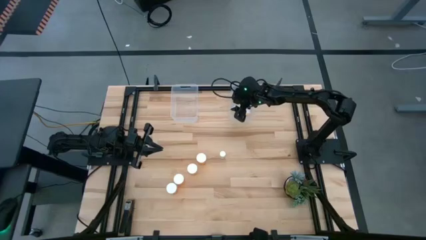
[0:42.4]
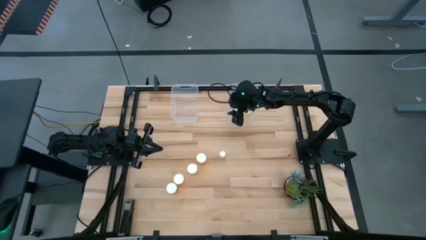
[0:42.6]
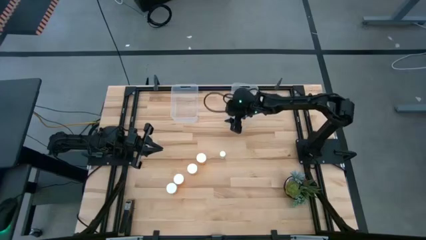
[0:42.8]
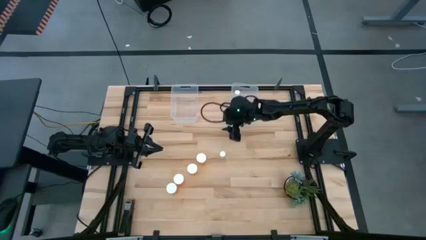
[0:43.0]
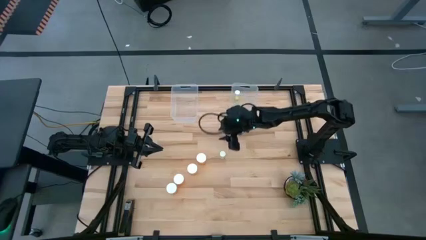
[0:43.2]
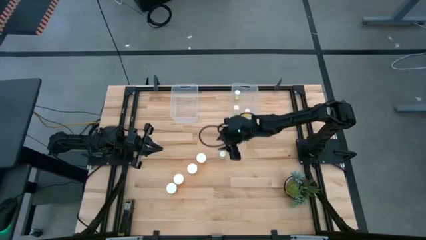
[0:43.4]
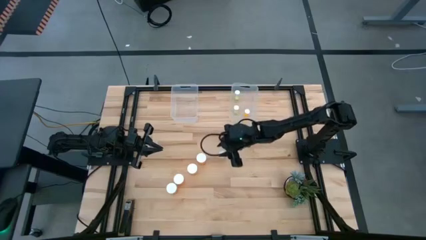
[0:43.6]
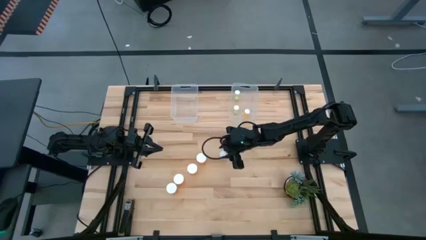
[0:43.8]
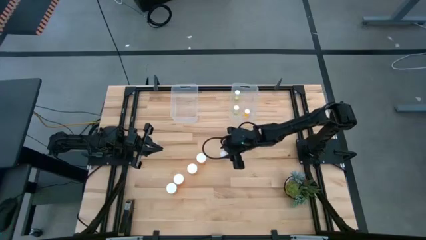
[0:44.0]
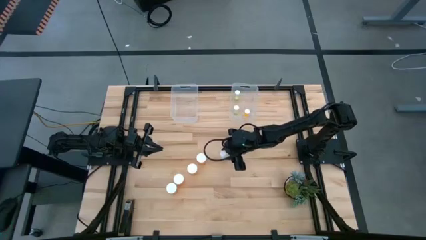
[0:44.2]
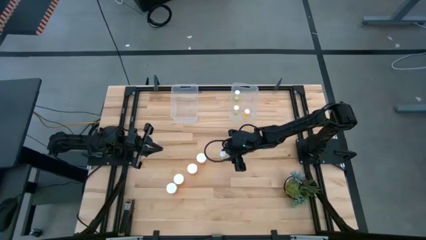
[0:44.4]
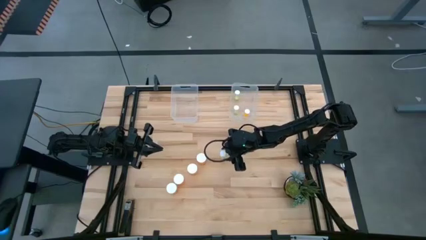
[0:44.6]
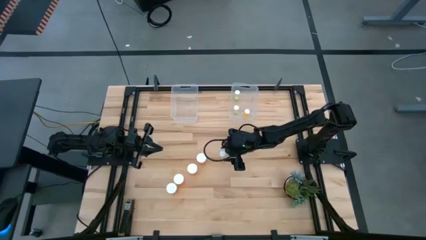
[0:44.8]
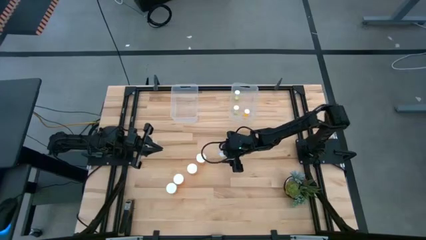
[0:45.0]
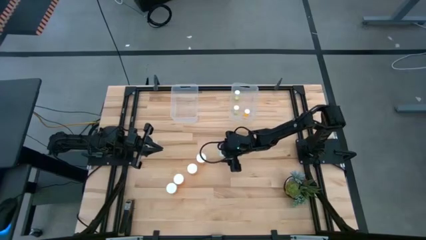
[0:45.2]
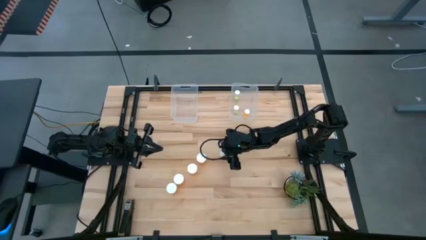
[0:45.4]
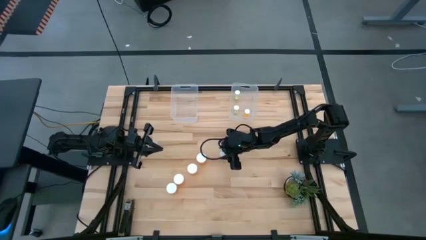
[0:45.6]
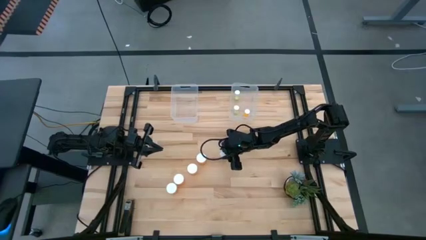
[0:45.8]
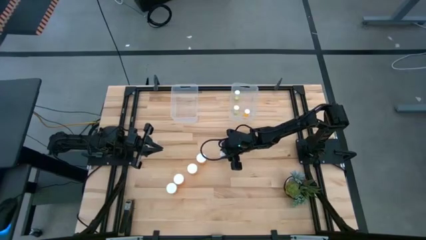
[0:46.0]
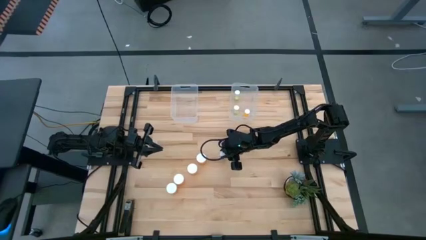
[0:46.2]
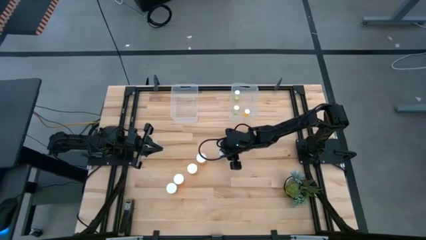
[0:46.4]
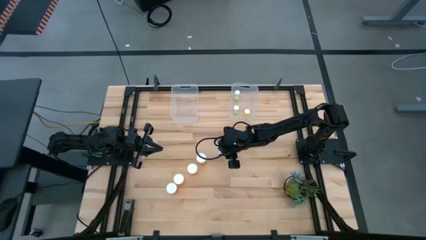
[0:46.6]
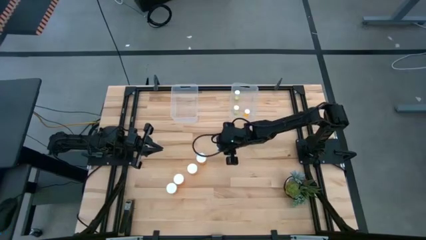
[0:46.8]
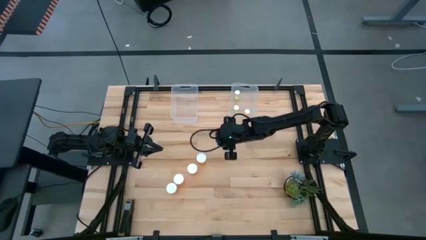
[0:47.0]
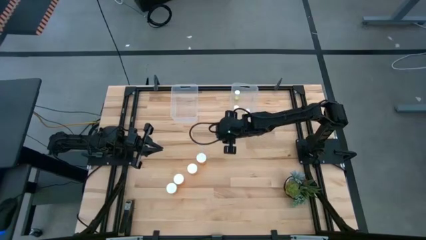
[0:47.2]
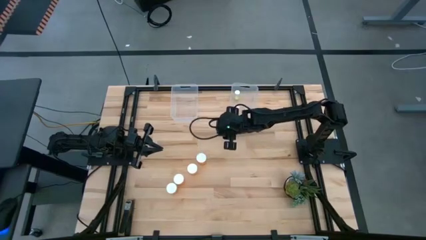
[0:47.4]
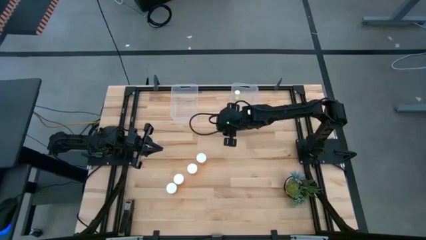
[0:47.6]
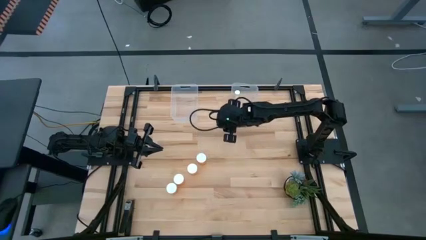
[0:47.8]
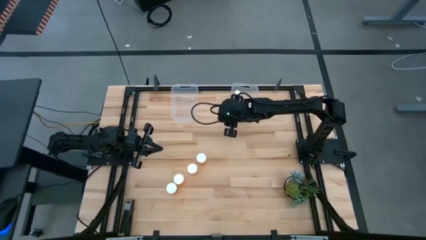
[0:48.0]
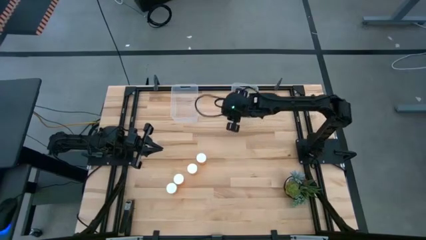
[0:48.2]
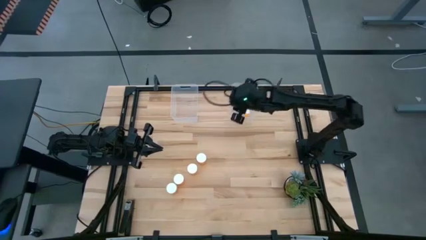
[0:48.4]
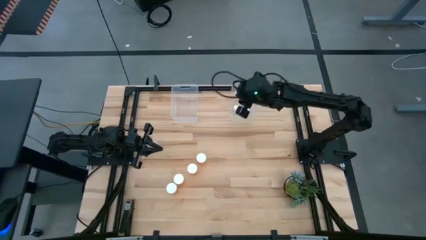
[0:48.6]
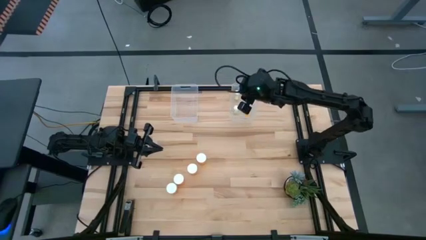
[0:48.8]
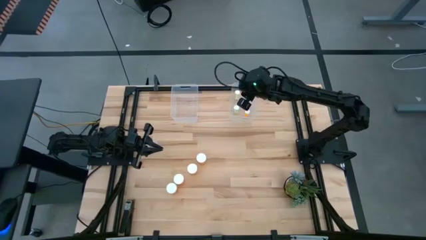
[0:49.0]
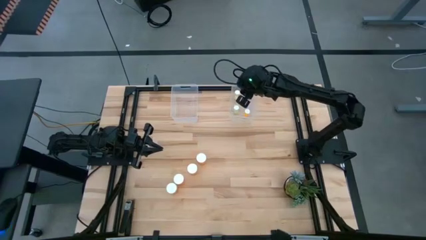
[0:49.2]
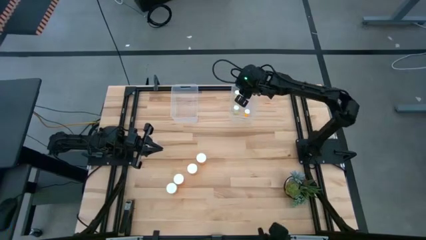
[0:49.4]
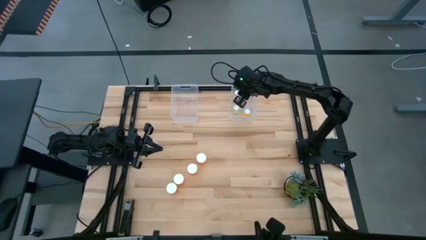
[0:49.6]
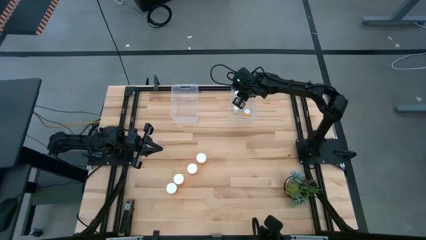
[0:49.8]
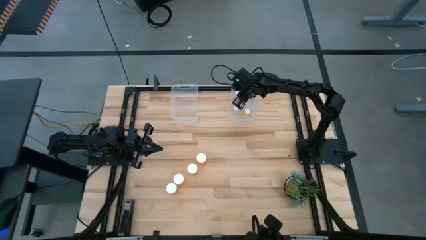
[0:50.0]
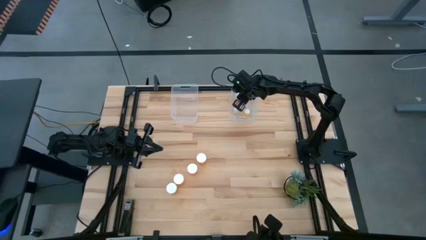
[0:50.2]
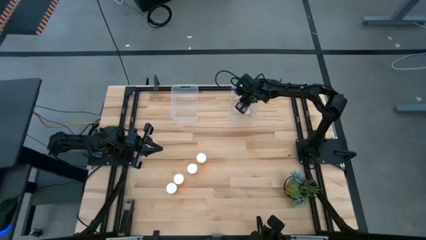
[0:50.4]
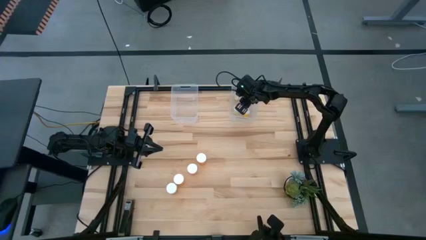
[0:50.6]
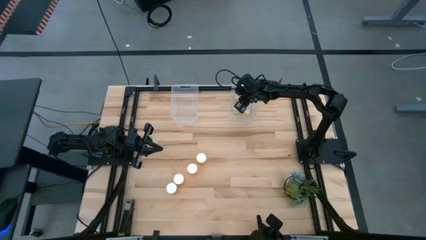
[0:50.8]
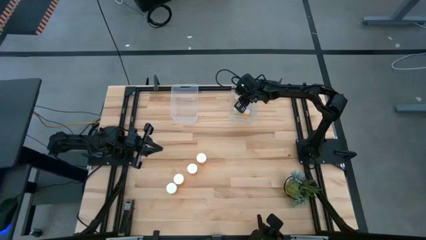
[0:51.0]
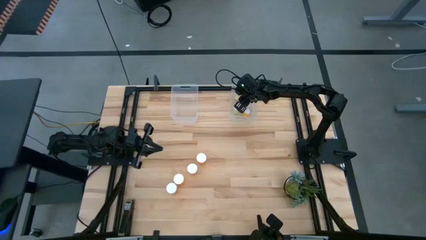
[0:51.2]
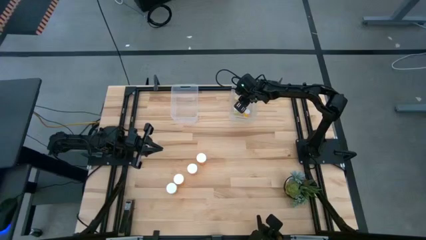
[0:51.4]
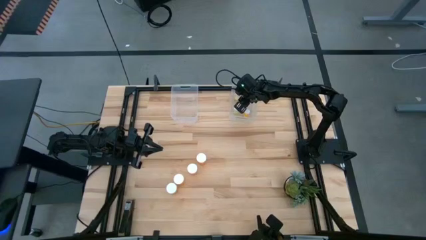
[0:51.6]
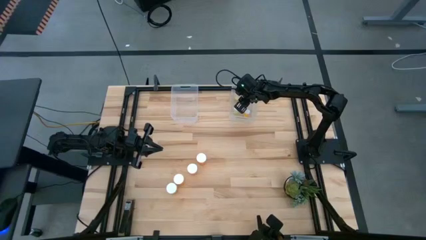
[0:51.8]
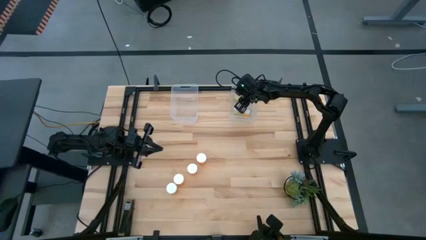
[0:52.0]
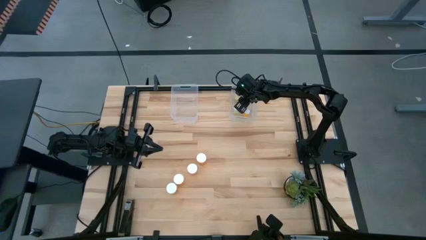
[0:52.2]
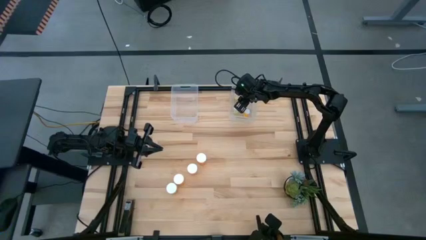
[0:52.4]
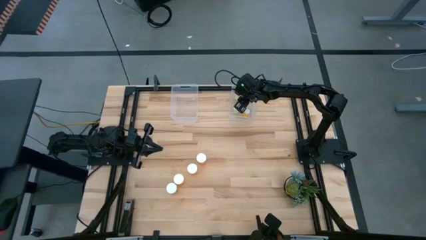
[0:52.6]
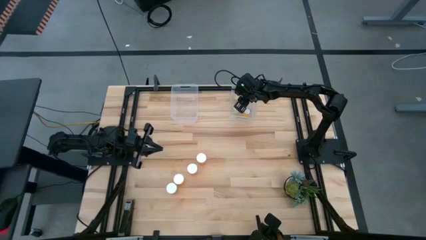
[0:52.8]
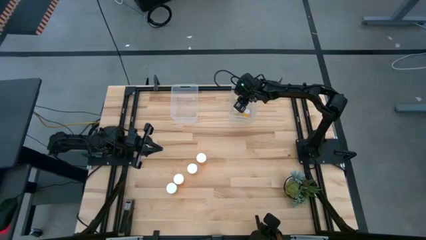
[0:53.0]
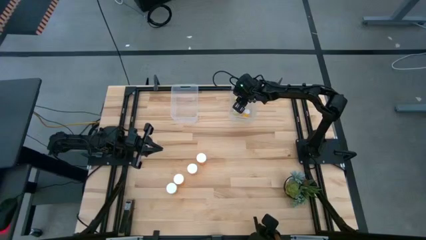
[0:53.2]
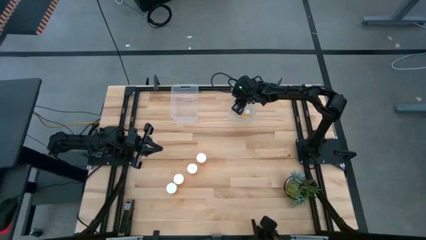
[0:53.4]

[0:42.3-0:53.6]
Task: Pick and place medicine bottles into bin by pill shape (circle, oval)
Put the small yellow pill bottle into the right transparent bin

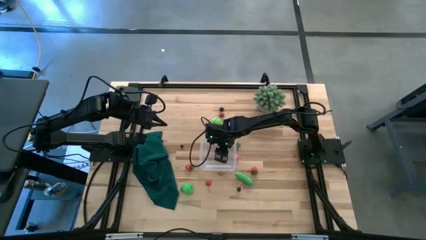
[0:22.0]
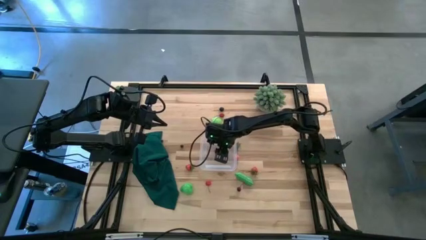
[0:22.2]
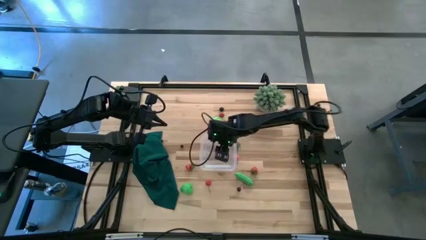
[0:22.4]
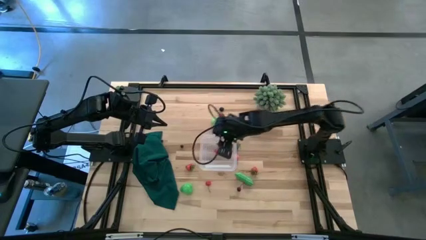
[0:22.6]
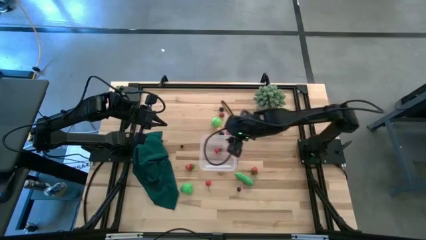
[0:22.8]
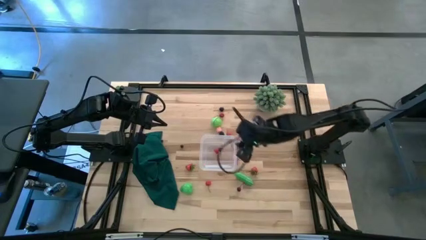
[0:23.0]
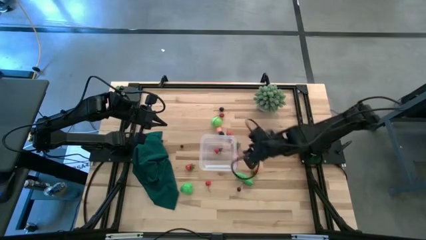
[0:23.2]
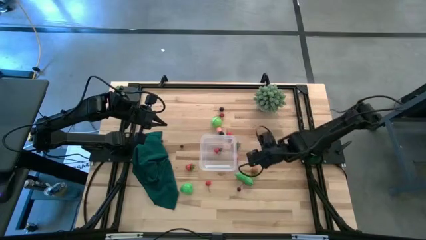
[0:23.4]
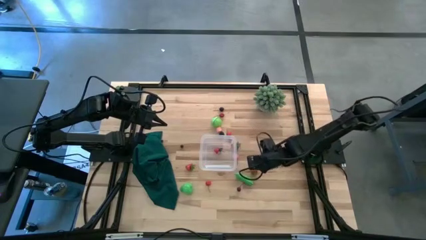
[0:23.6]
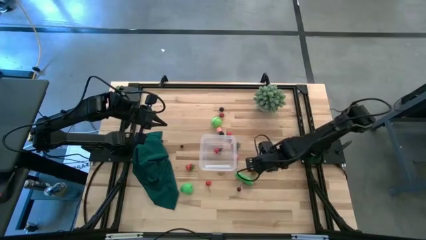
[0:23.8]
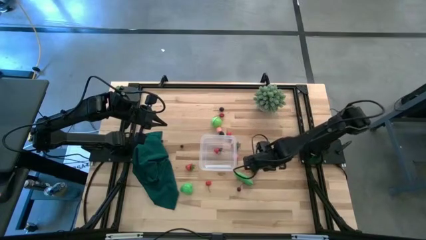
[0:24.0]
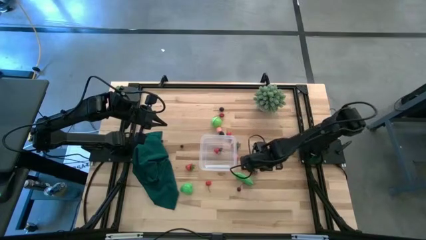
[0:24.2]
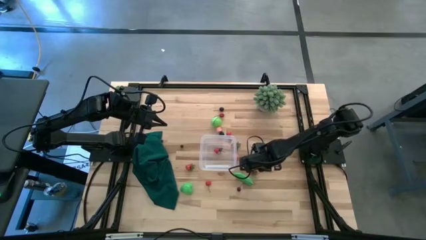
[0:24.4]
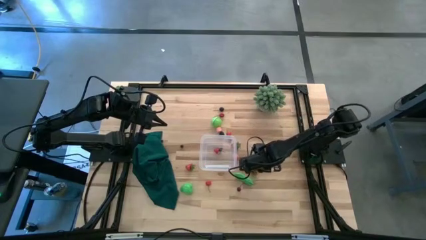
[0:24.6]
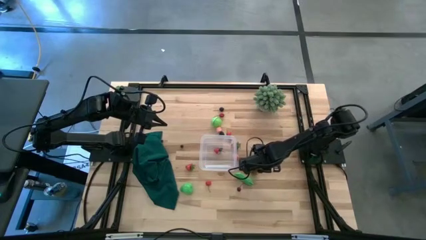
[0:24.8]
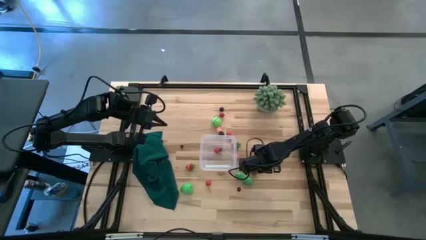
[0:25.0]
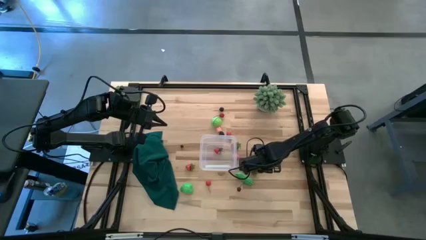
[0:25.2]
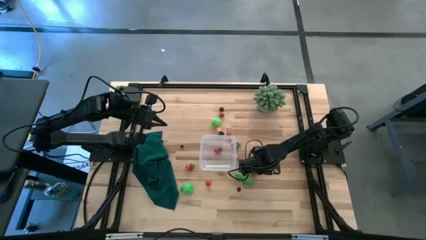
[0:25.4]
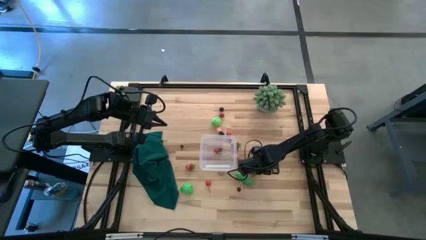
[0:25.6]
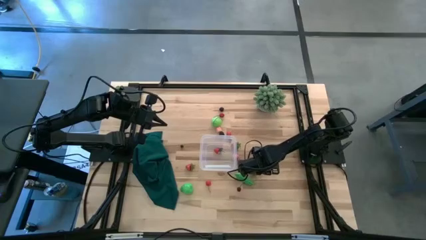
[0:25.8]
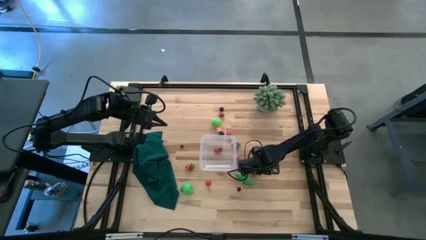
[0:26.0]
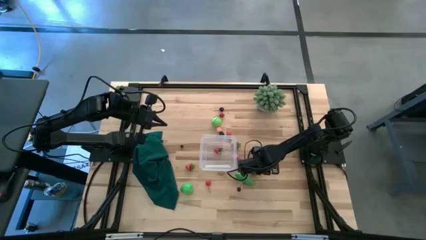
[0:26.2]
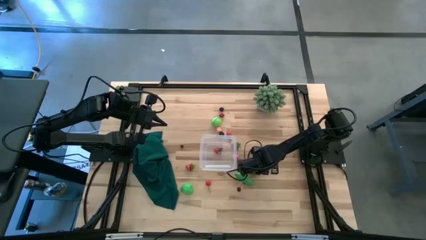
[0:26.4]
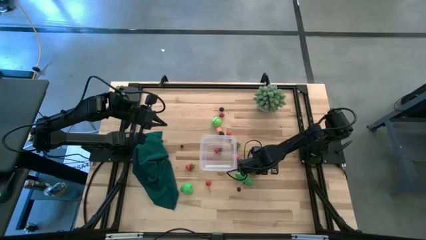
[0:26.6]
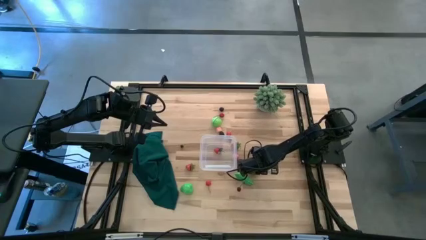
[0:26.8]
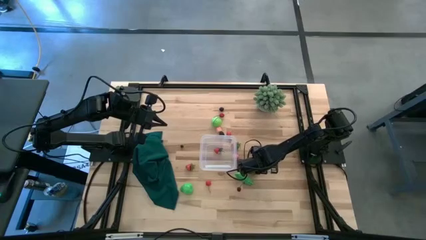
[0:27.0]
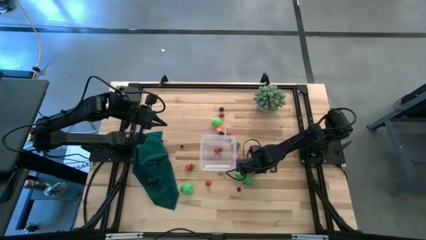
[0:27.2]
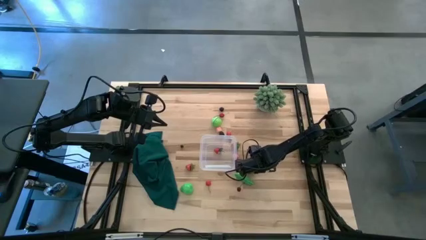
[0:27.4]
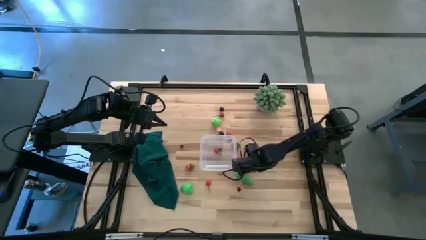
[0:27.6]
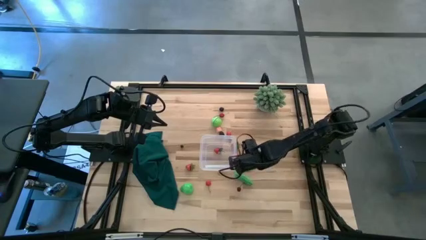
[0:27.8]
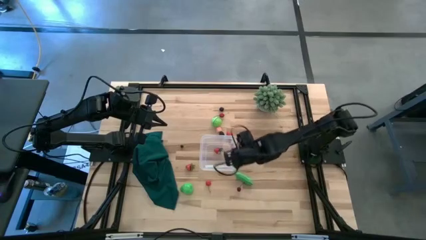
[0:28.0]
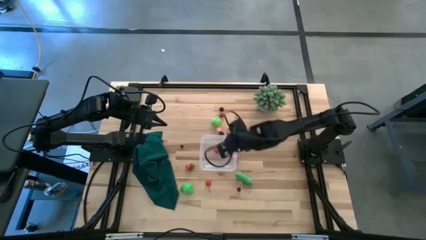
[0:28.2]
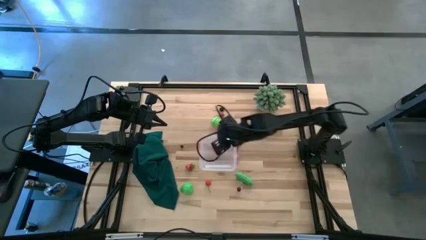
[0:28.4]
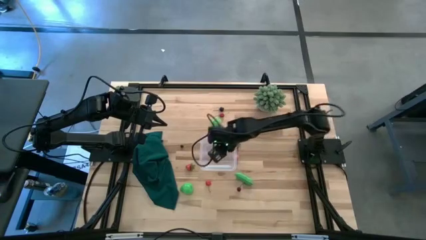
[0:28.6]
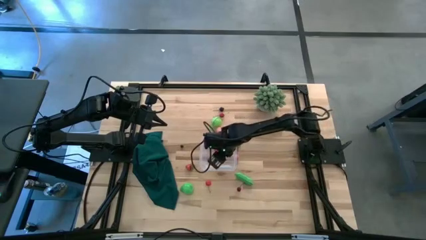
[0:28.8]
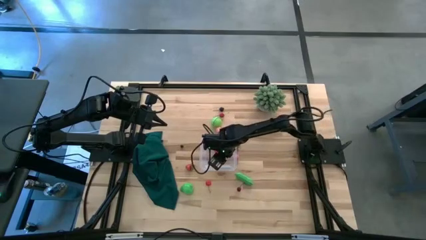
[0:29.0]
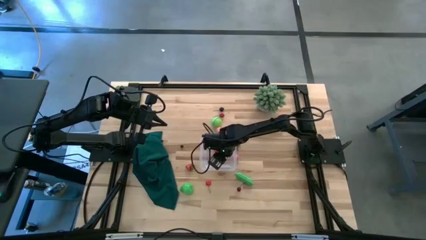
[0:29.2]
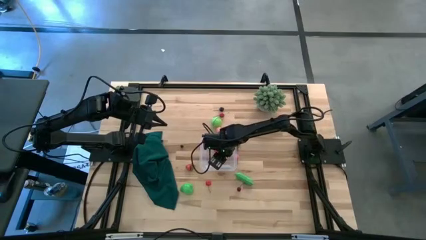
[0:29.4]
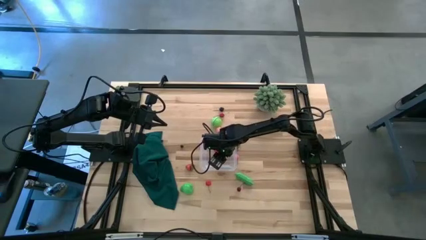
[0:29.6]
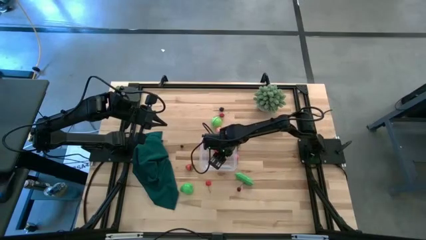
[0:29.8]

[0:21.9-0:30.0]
Task: Pick and placing Produce into tupperware
Put the red strawberry into the transparent bin
